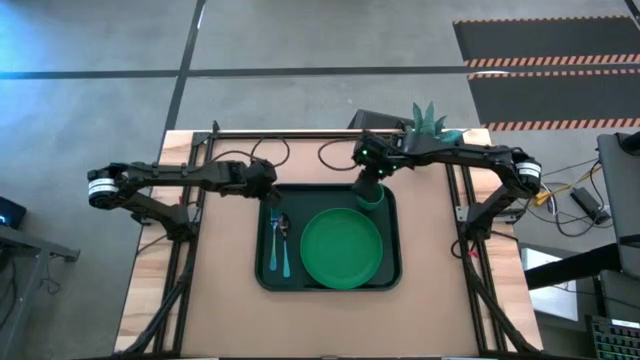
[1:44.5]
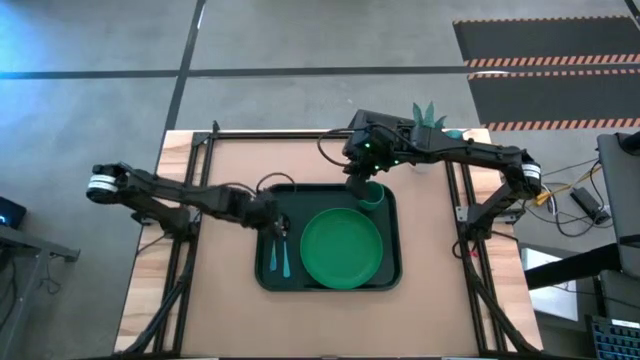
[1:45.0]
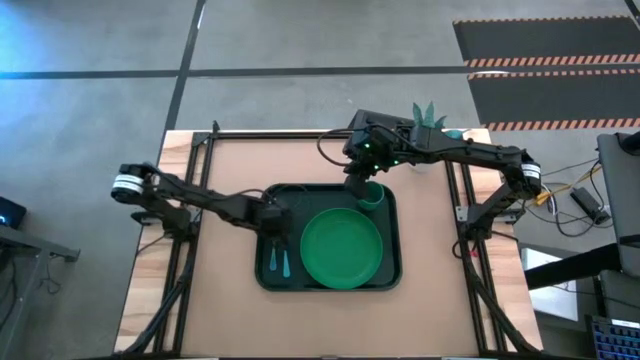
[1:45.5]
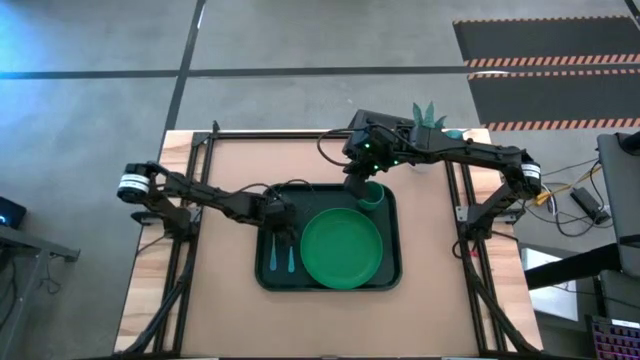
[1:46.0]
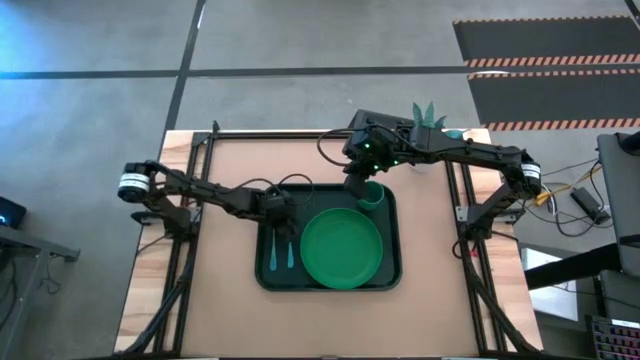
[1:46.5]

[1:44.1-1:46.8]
Task: Pick and place plate/cup/fork/spoon on tray
Adjust the blue spoon on the green tray

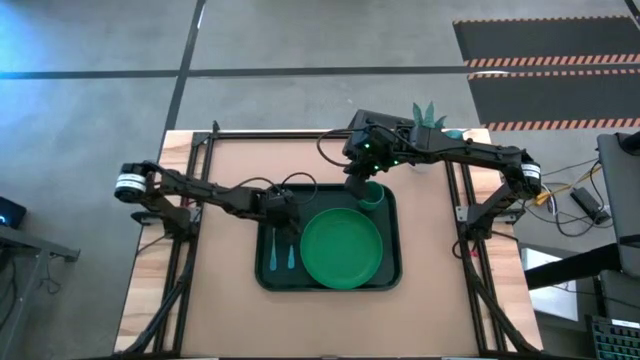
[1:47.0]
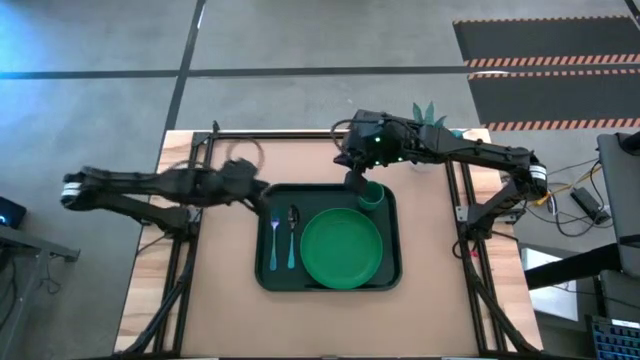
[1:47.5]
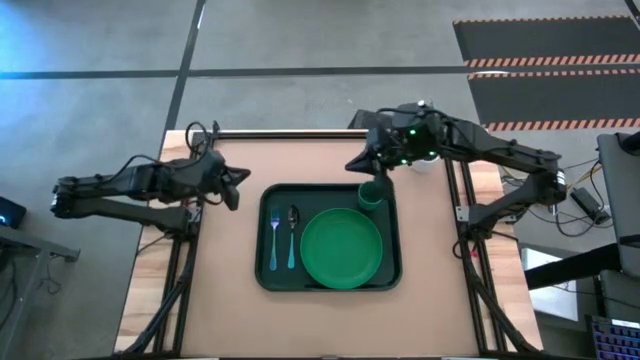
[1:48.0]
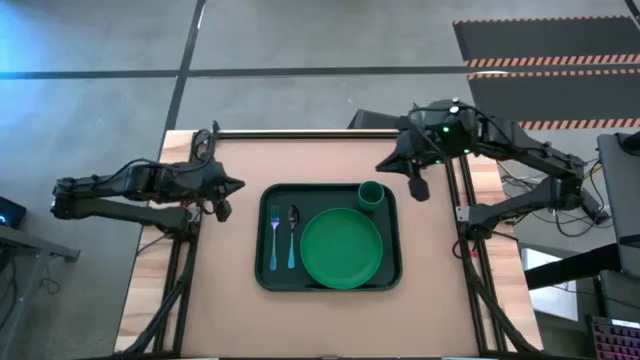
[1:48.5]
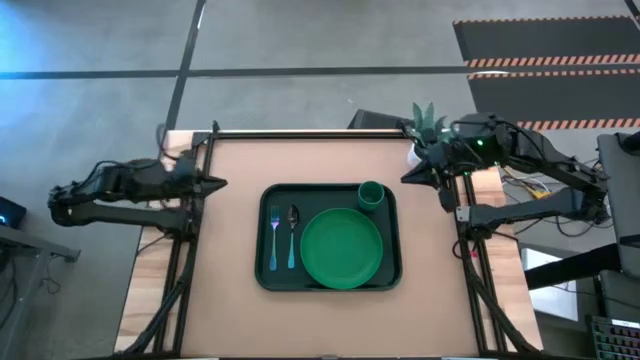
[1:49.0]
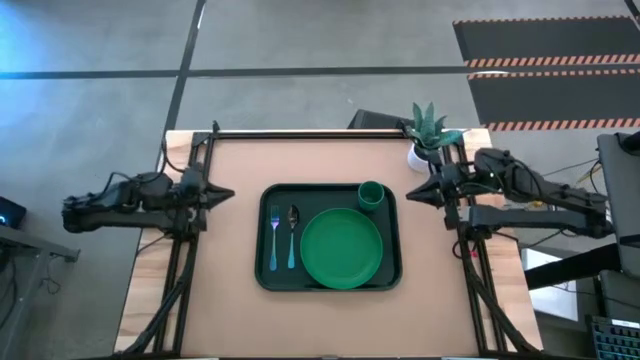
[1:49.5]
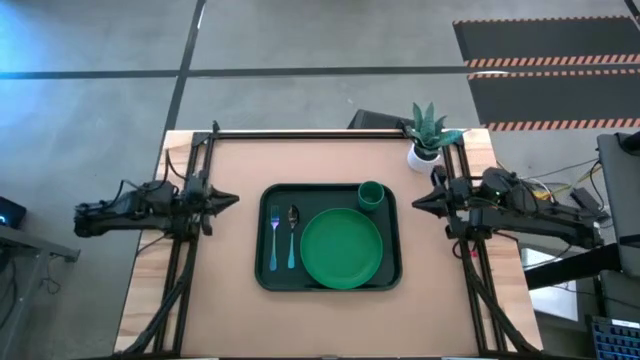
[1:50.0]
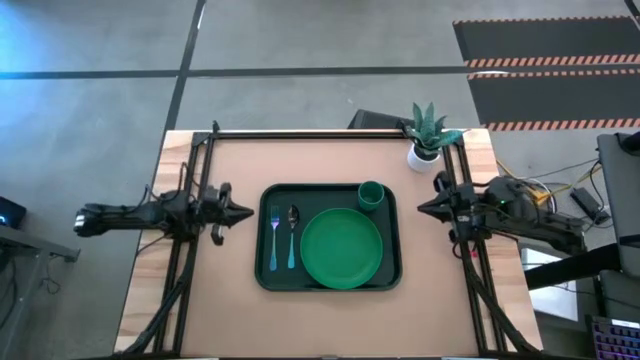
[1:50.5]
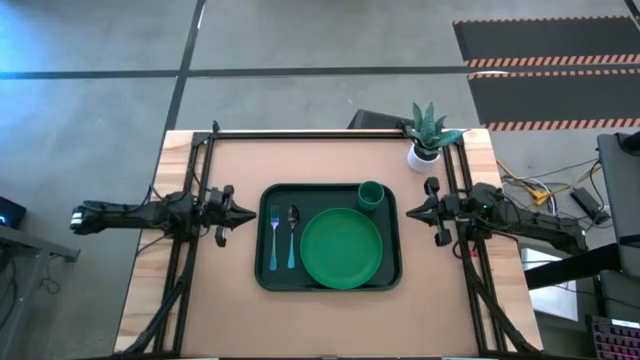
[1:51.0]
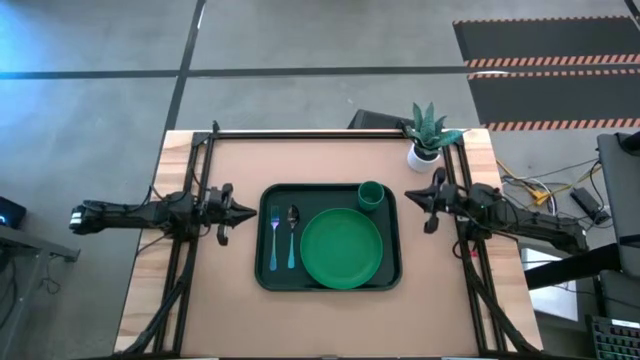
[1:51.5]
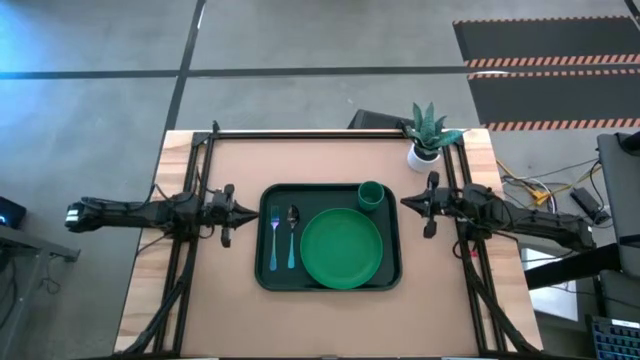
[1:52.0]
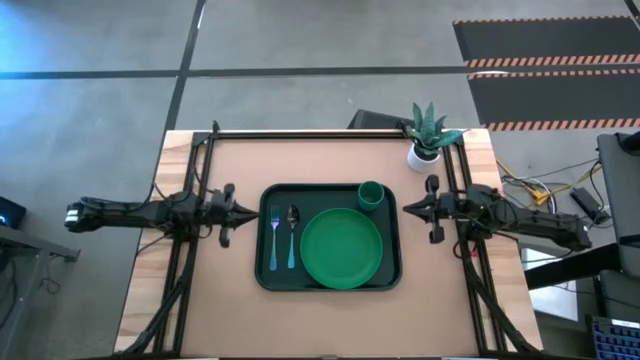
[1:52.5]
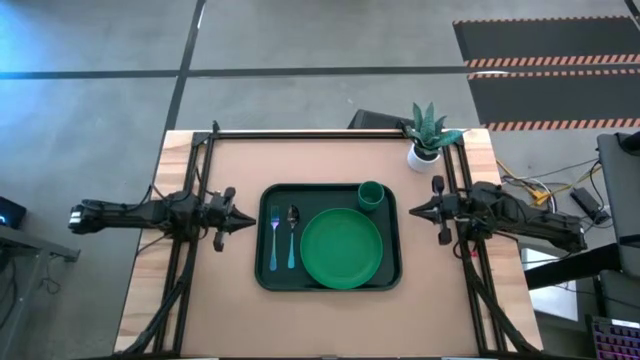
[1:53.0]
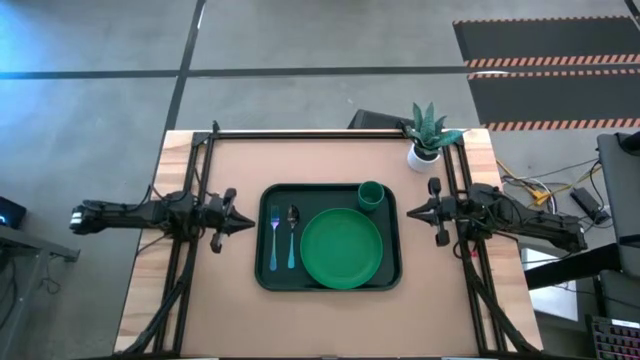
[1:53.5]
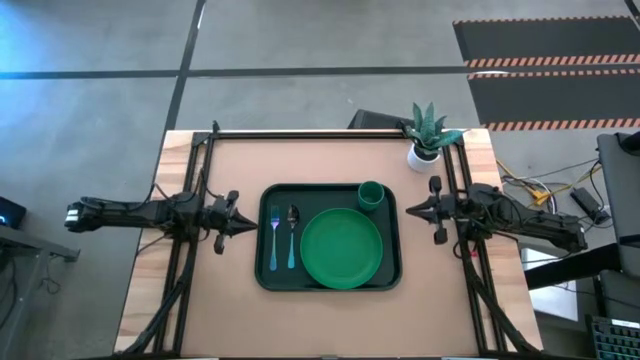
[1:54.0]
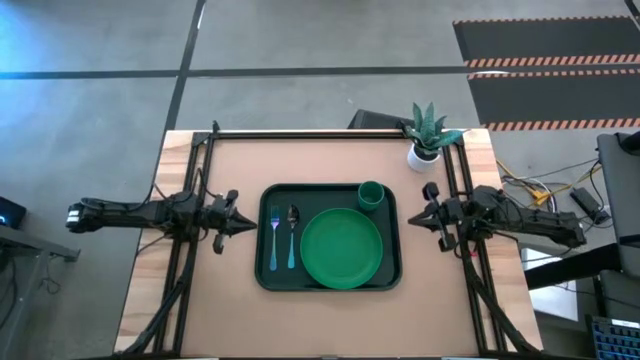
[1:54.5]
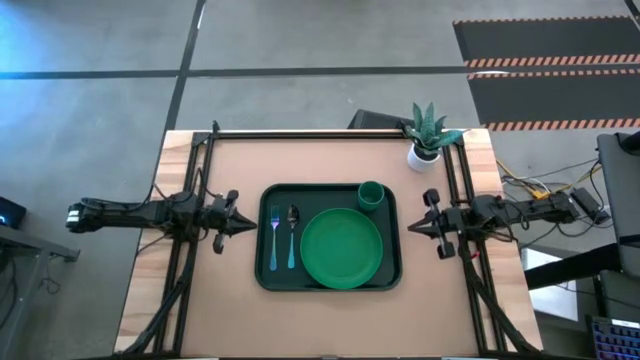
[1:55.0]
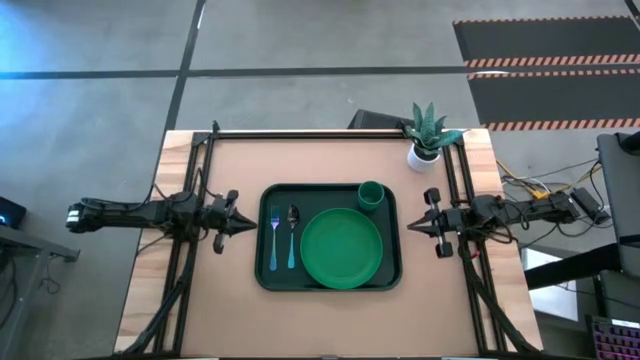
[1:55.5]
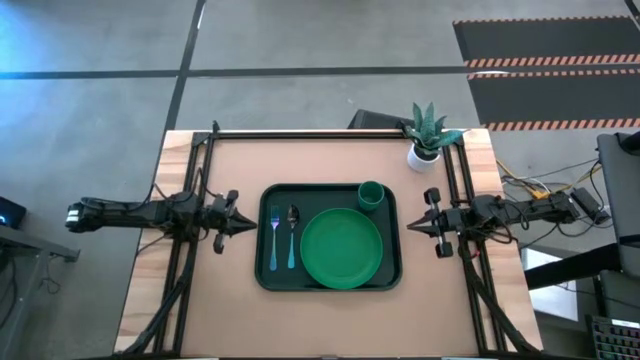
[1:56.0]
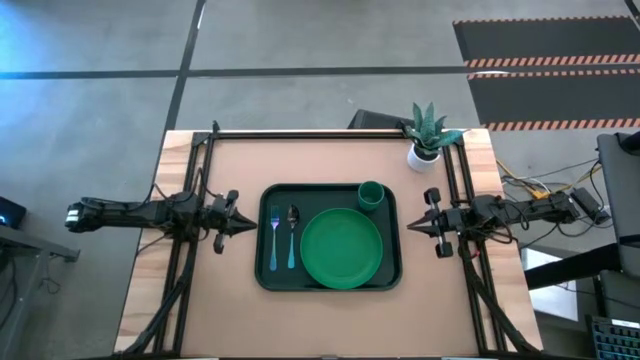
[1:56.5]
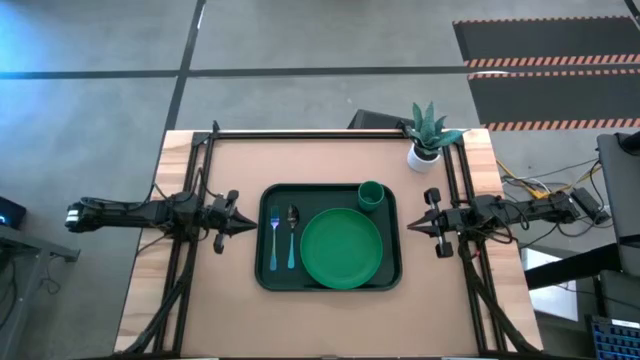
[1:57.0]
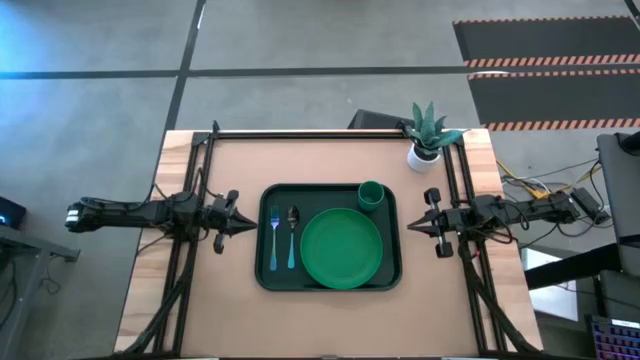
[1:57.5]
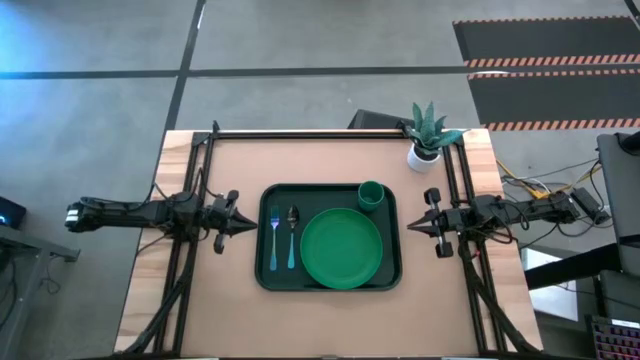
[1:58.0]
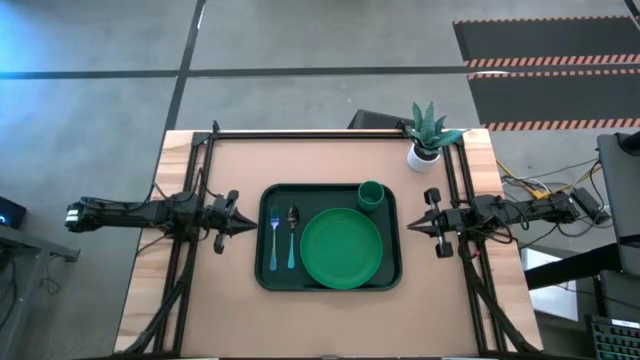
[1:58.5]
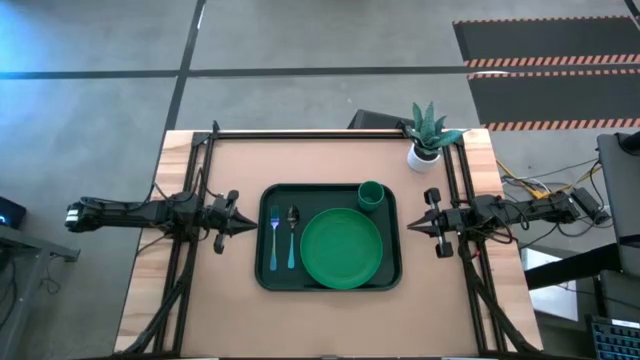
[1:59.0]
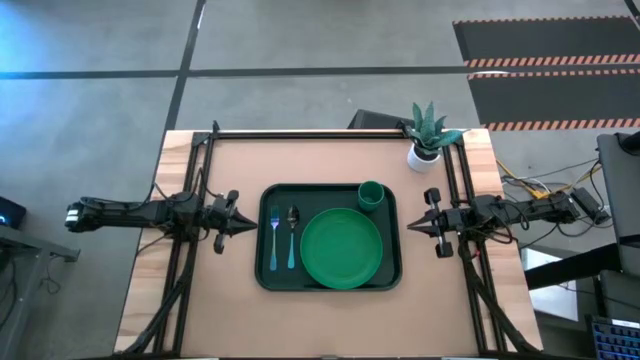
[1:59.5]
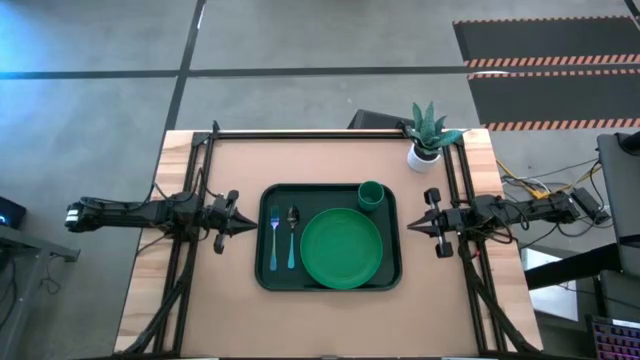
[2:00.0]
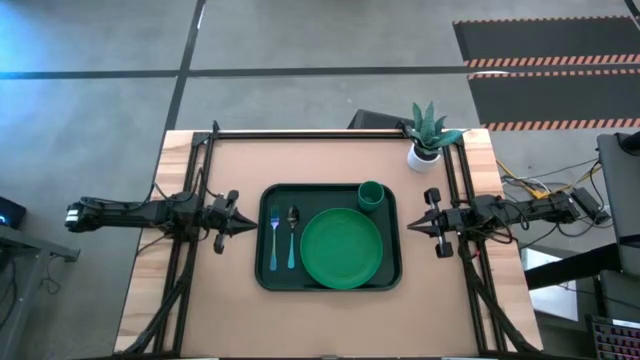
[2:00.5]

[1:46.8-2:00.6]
Return to Home Position

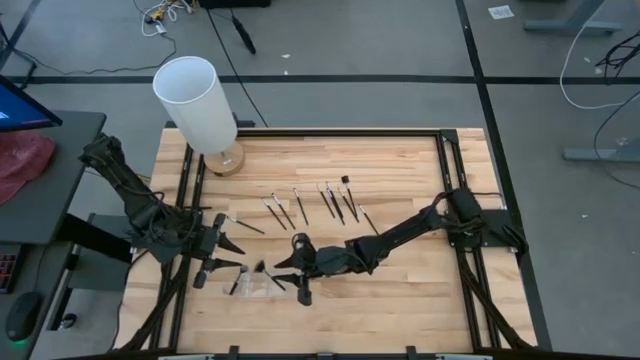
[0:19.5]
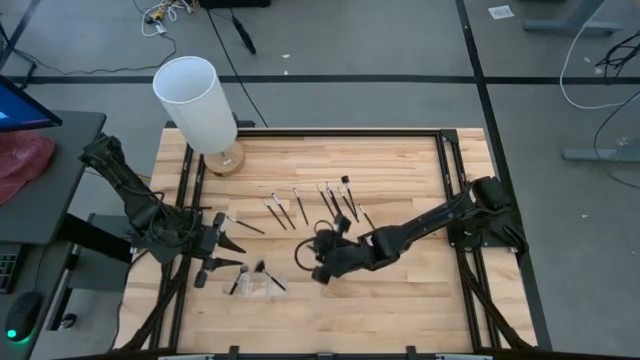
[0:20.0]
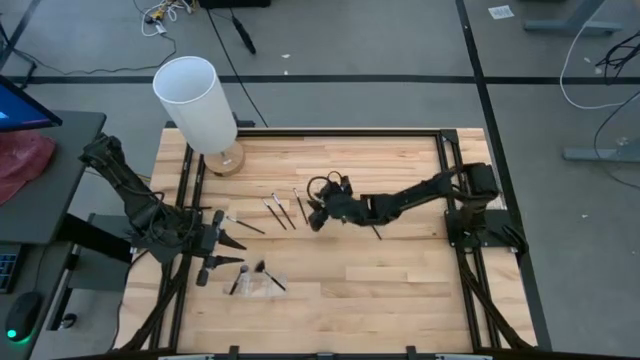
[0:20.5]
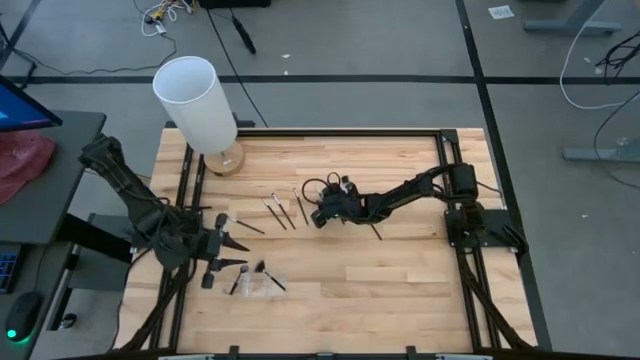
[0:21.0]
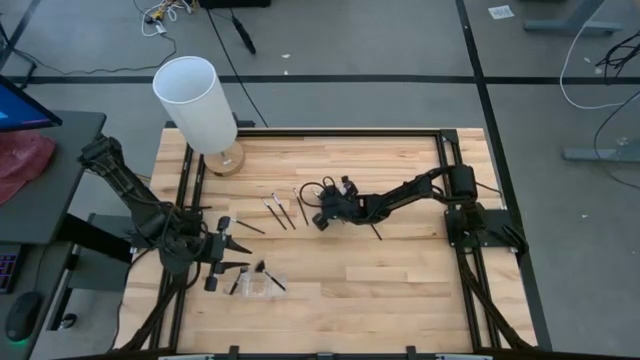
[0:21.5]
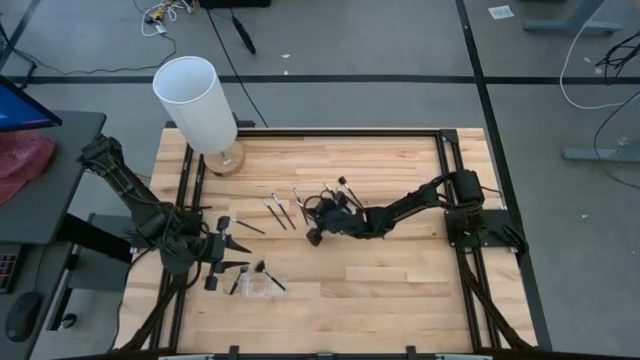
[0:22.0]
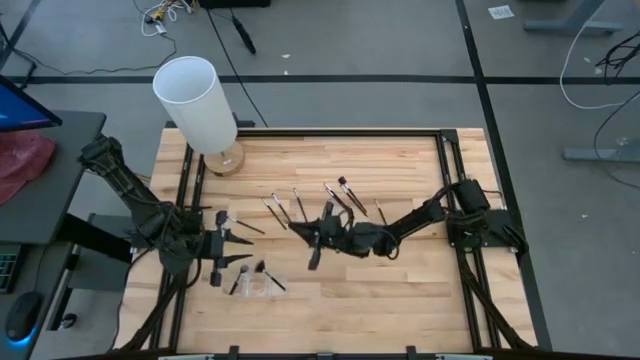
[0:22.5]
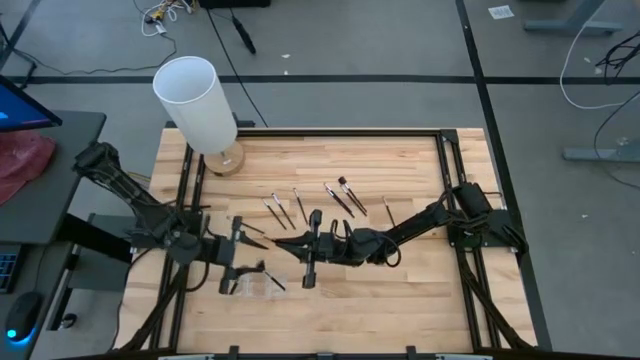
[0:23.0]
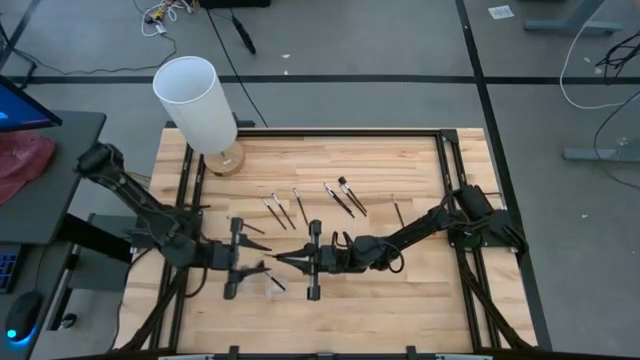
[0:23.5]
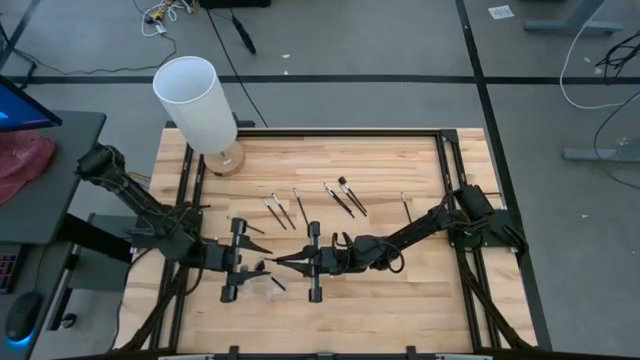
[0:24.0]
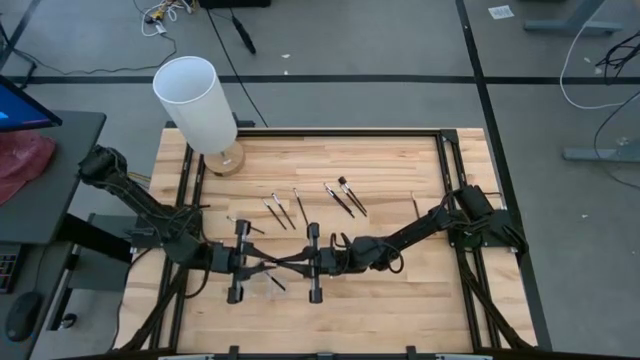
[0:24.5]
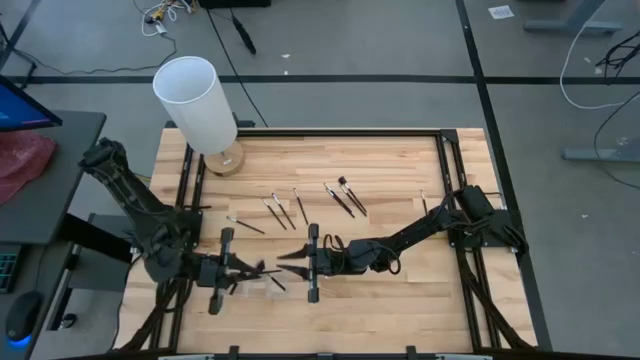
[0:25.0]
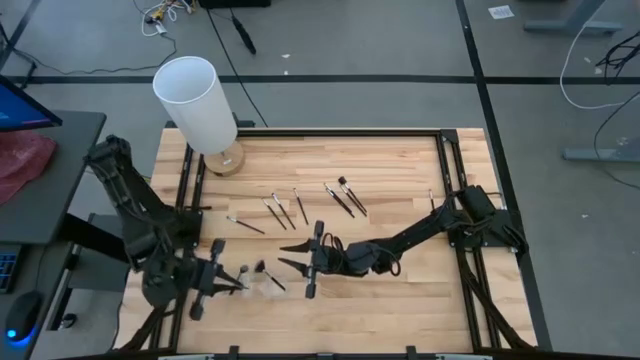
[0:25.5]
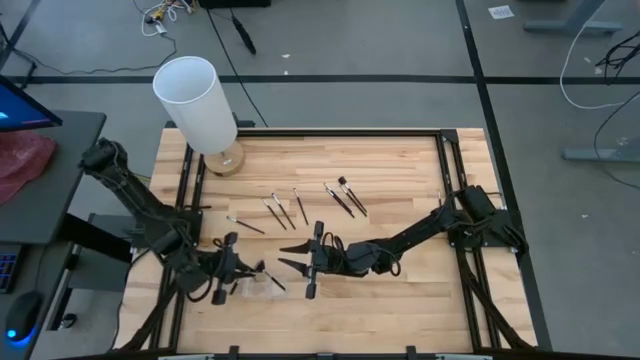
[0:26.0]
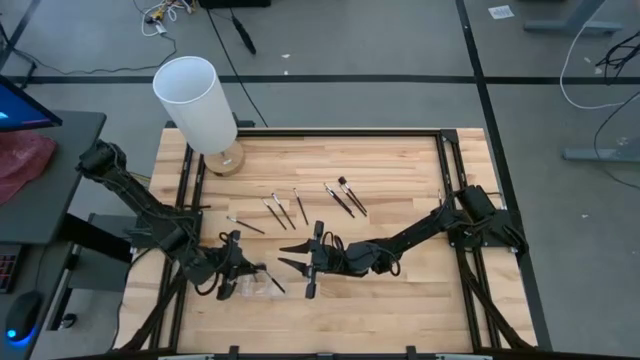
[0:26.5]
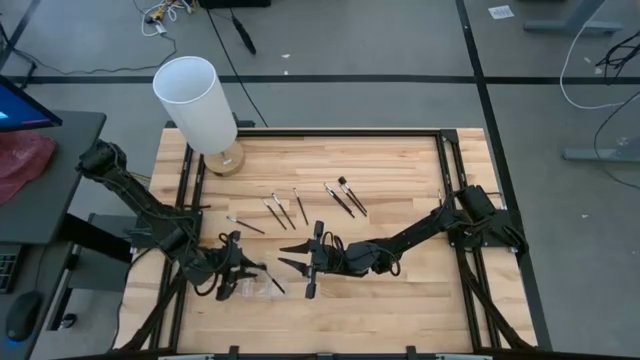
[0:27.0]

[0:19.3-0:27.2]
Task: Put items in baskets/containers
Put the liner brush into the transparent organizer
